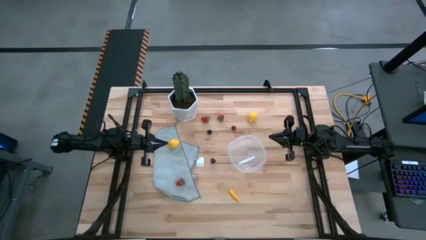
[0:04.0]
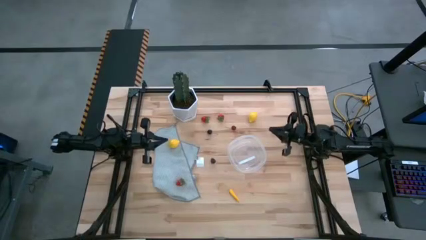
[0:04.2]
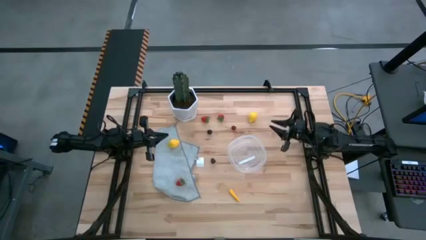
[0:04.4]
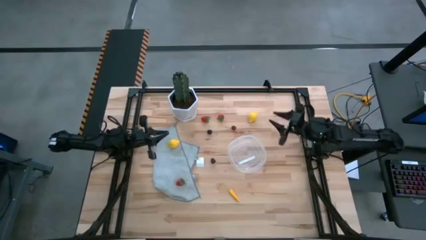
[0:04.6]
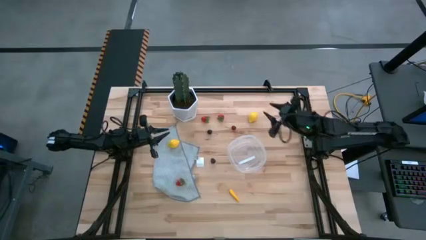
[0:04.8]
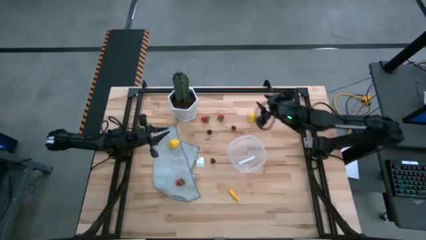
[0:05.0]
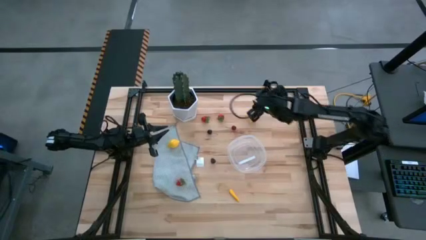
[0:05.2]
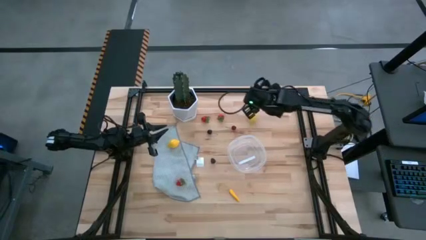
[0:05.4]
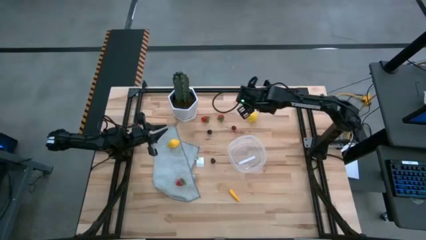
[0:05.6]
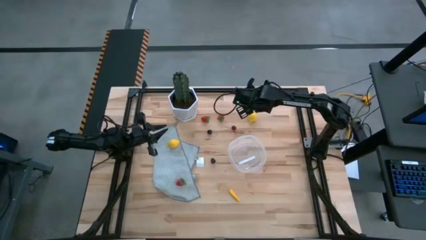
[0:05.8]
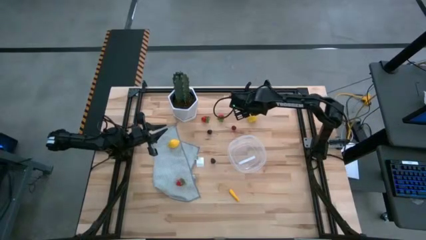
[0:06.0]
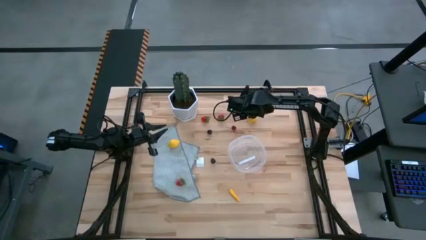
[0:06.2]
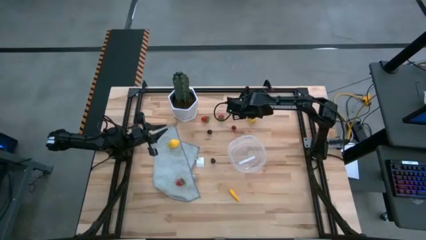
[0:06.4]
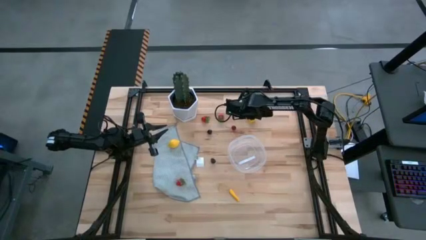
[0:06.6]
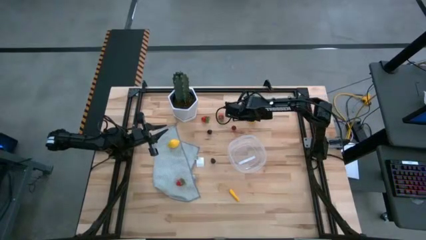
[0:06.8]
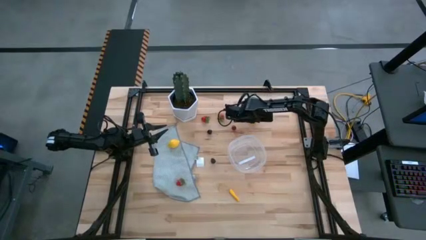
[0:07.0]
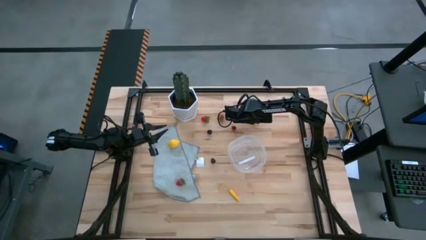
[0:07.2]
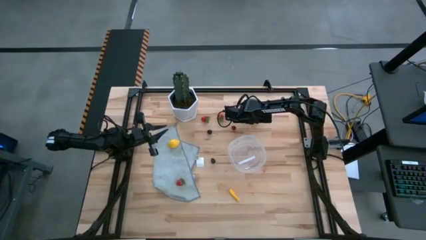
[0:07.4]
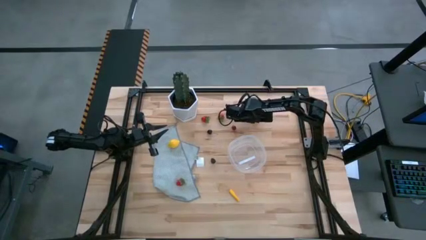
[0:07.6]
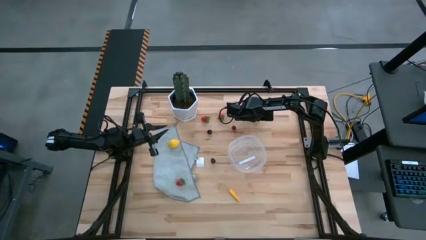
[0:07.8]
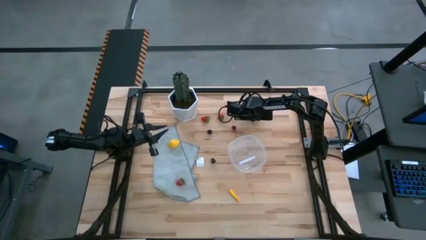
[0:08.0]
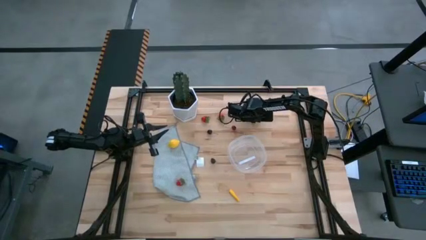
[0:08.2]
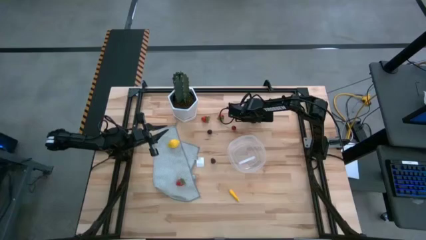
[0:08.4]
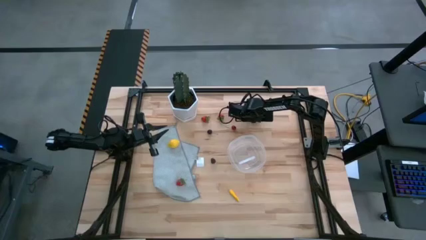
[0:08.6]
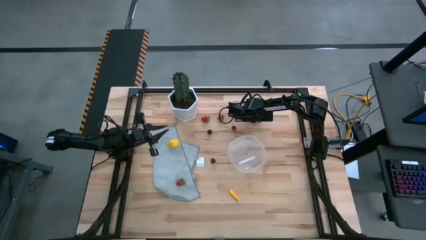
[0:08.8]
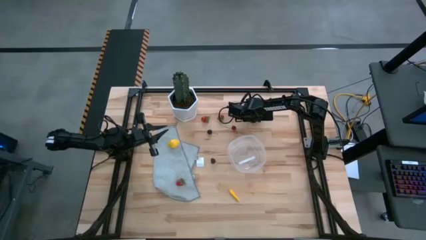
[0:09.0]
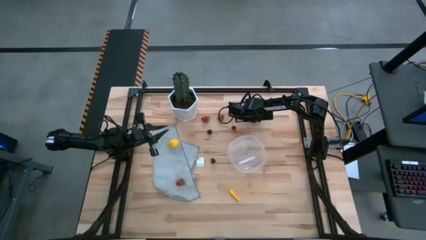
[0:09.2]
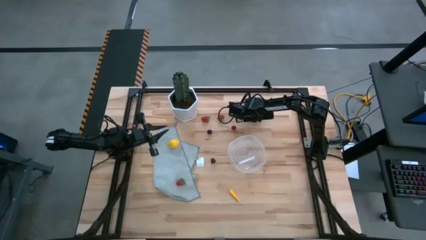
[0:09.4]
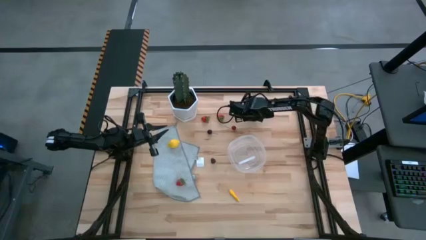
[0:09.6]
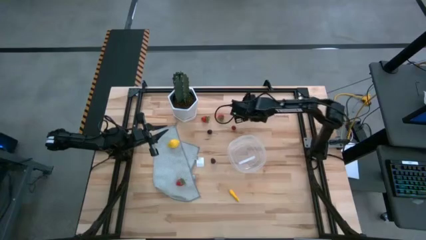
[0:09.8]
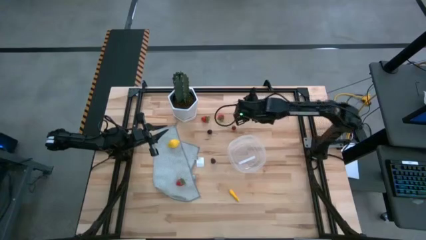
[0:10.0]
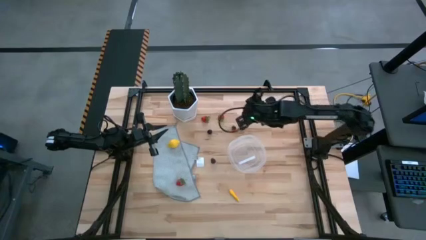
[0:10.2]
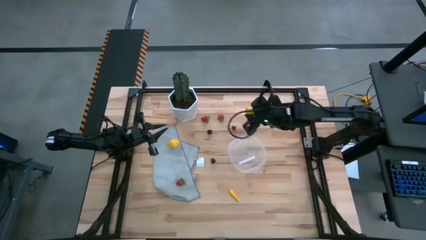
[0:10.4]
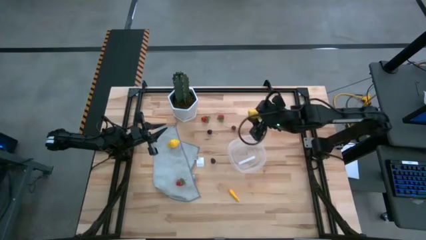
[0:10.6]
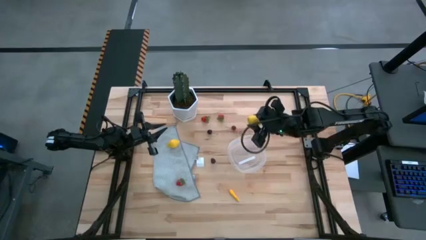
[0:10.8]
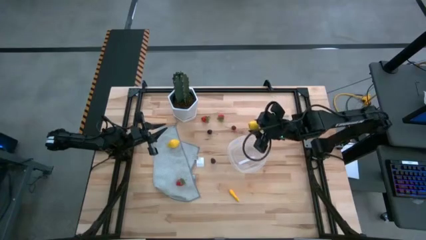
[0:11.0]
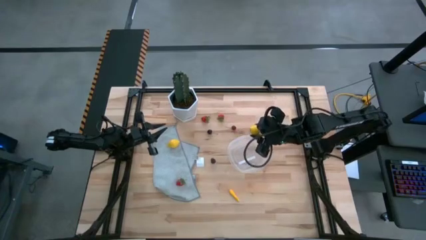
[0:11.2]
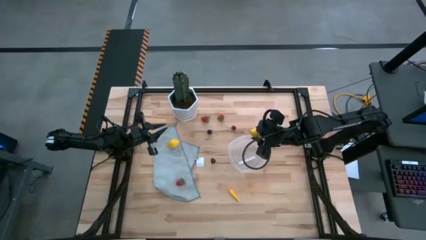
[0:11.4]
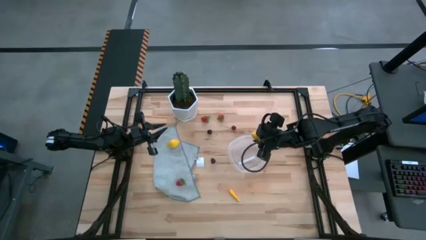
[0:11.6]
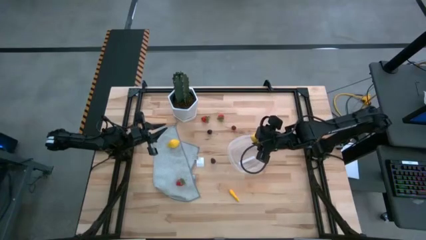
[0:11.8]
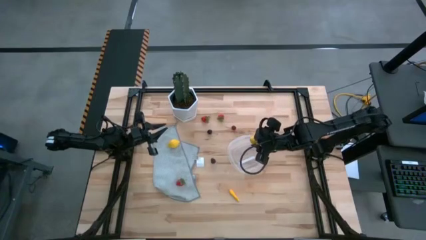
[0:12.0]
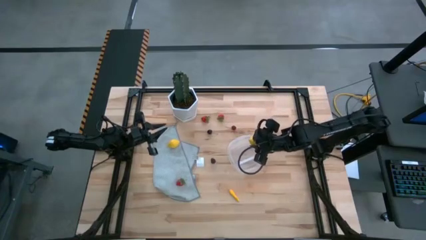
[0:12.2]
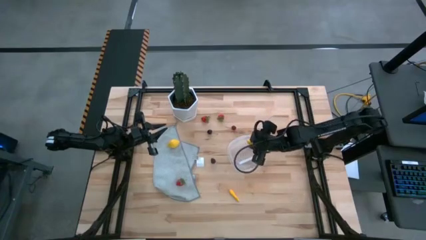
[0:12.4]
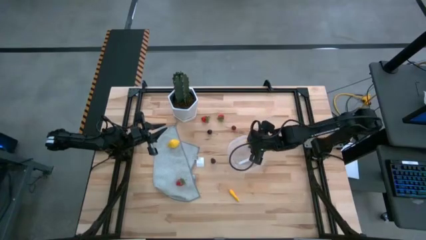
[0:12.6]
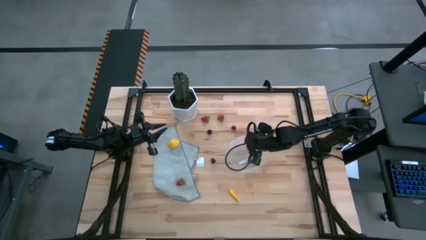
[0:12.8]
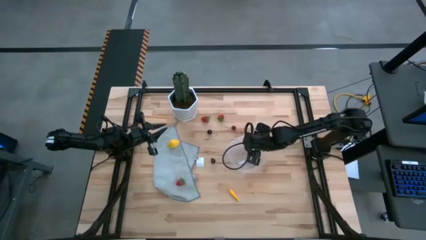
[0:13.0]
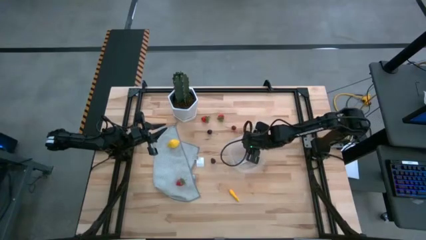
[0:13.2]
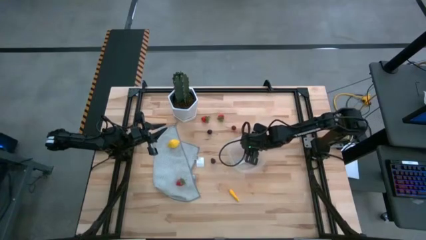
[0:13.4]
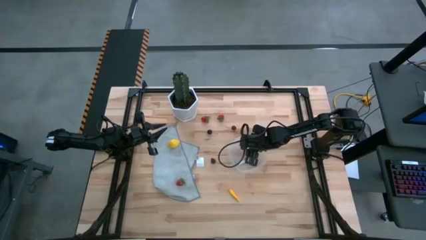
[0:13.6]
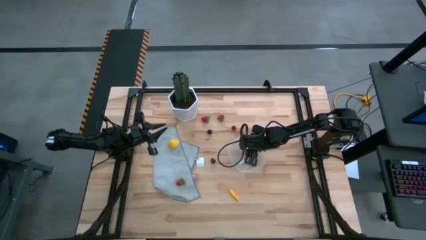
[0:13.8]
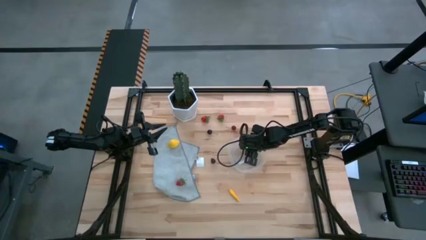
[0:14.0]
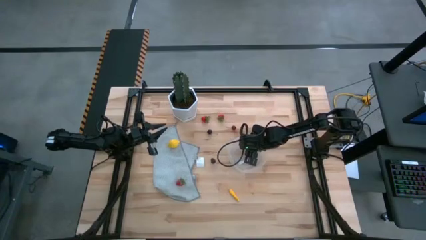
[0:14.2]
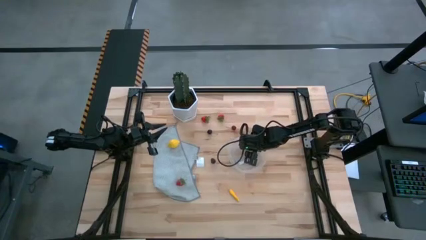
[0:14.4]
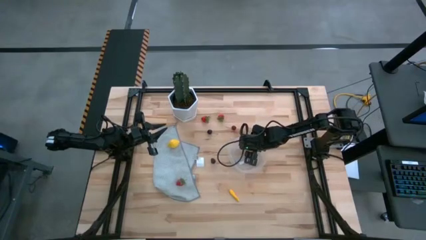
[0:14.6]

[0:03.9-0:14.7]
Task: Pick and placing Produce into tupperware
Put the top yellow lemon into the transparent container

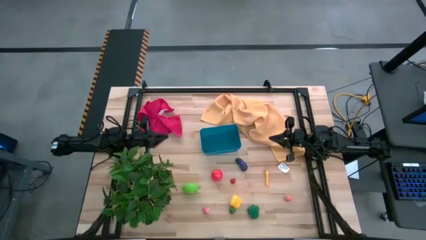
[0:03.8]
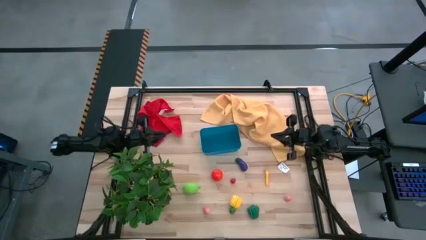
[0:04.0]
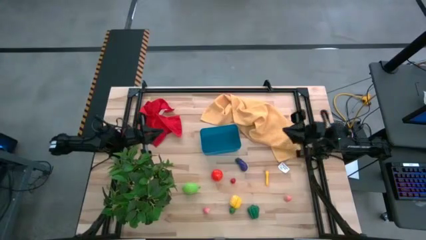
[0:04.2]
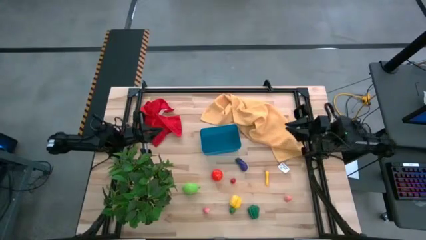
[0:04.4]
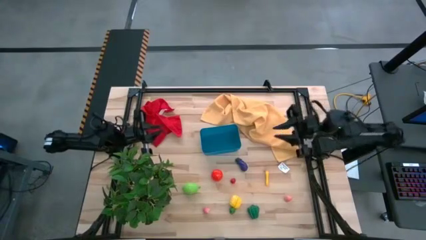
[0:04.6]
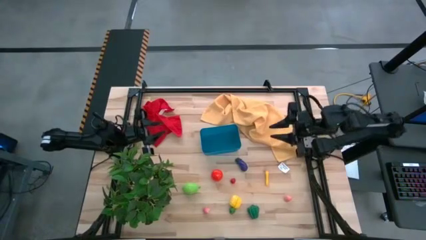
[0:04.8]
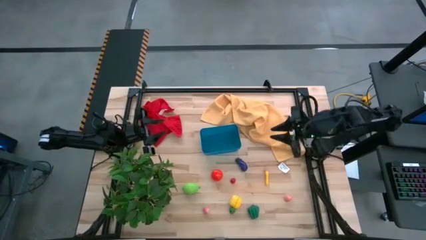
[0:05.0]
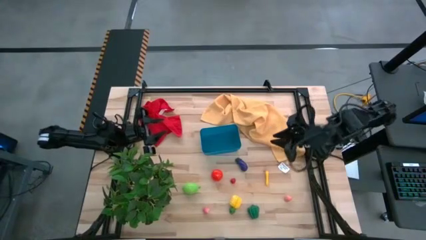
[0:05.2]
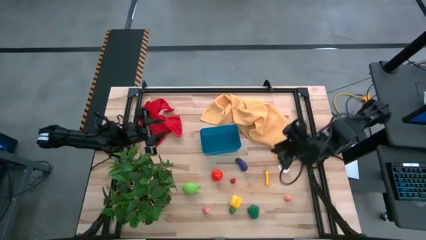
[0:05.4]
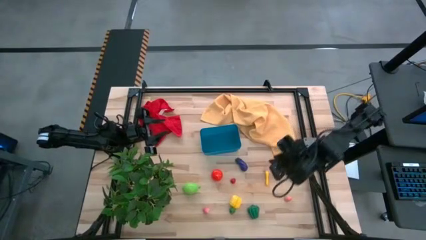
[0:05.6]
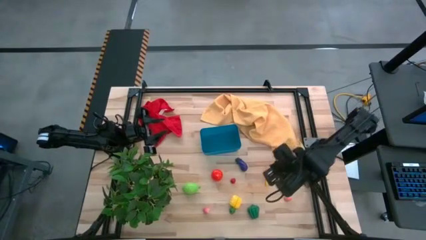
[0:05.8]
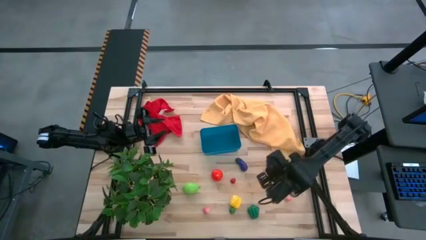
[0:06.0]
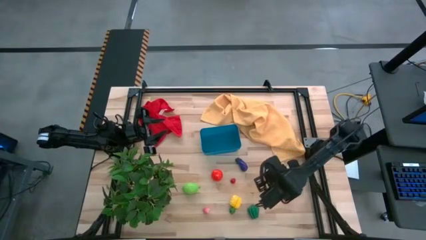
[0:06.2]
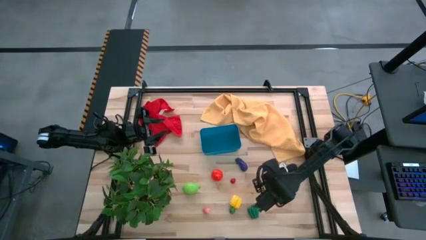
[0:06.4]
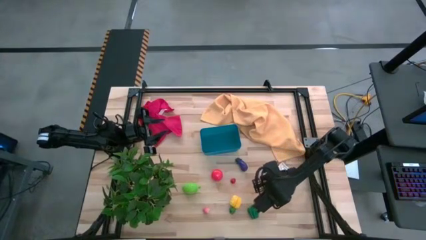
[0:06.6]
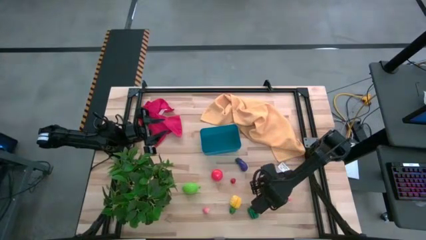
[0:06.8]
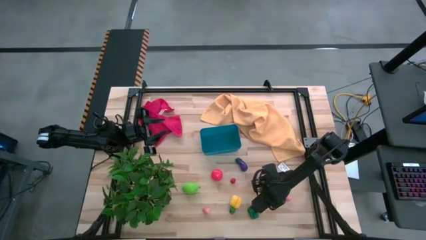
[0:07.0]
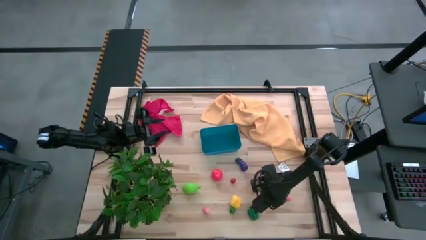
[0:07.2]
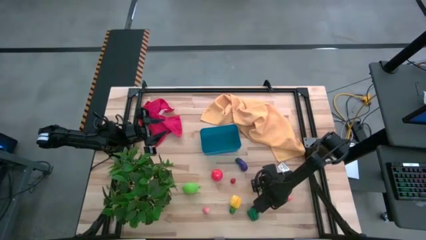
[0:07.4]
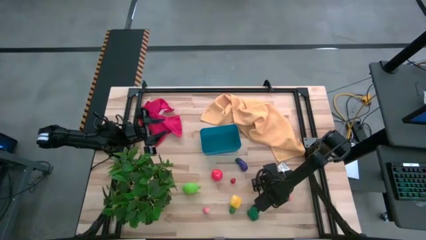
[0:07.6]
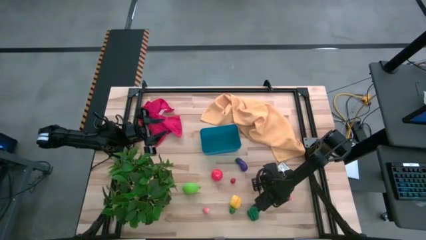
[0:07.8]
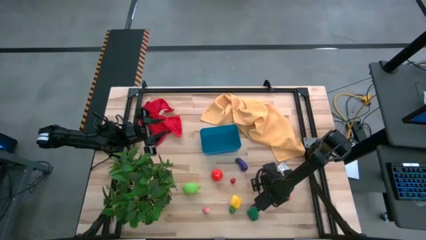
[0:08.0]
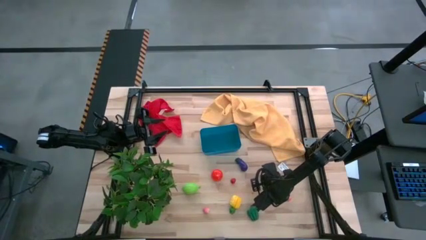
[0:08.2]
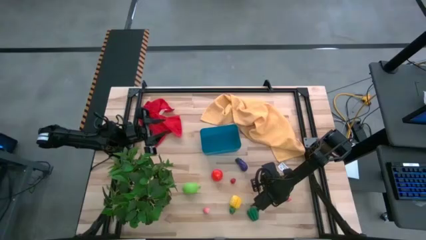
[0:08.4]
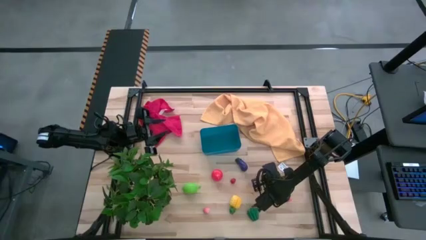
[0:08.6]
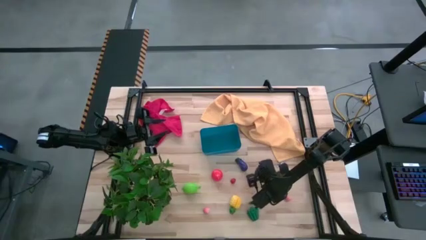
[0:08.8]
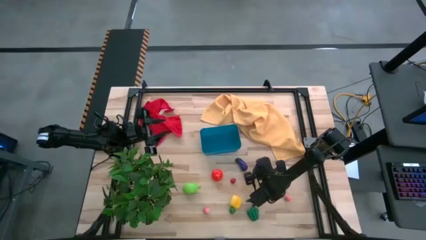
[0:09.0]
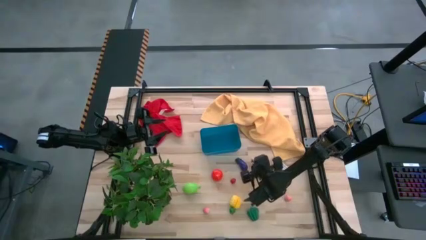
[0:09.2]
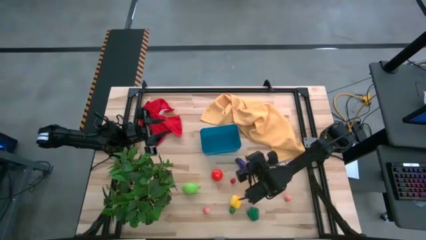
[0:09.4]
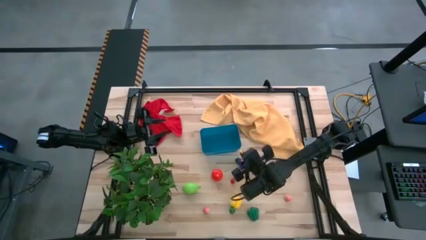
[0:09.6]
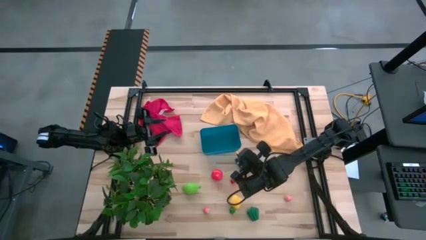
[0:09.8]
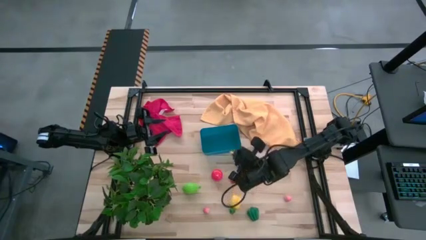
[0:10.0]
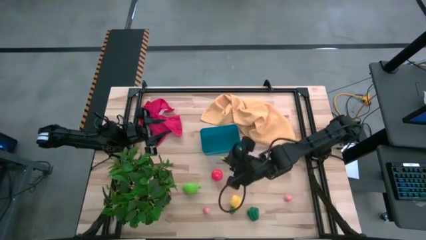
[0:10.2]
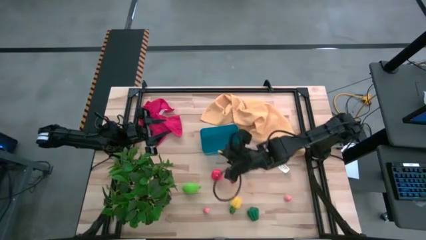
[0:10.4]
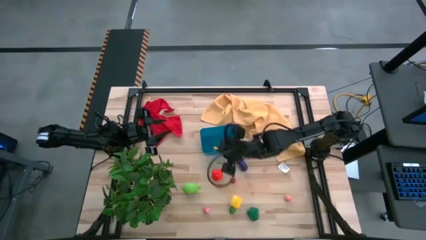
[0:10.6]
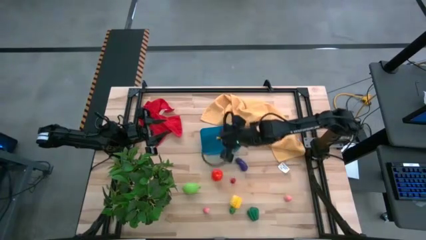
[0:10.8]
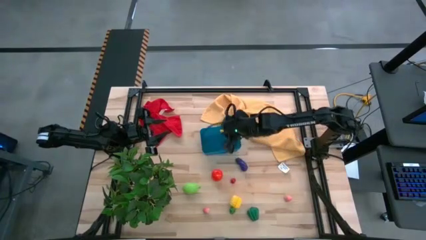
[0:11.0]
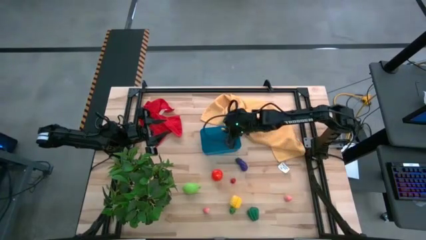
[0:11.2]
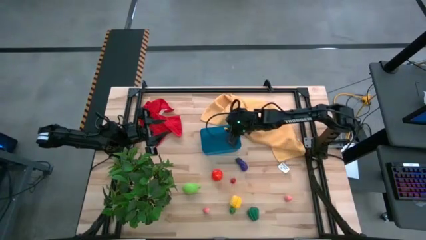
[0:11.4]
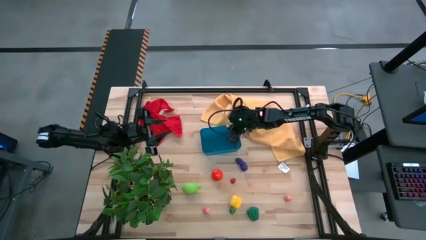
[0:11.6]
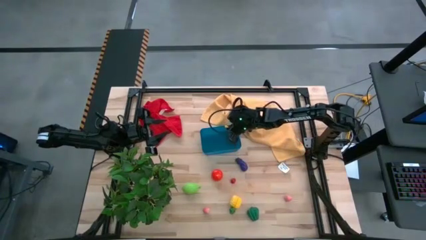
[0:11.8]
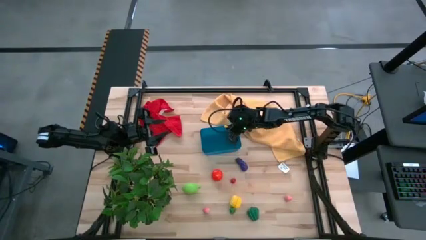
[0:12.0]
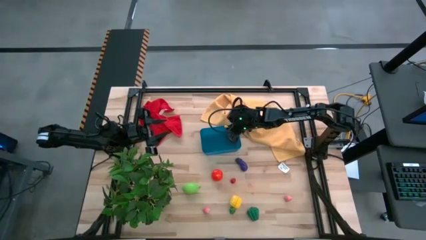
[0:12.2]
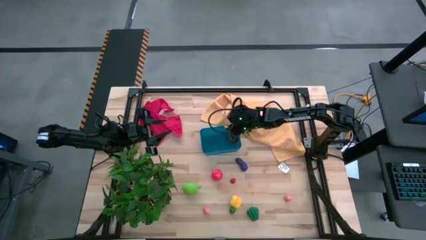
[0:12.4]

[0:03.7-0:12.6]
Task: Pick and placing Produce into tupperware
Put the yellow corn into the blue bin
